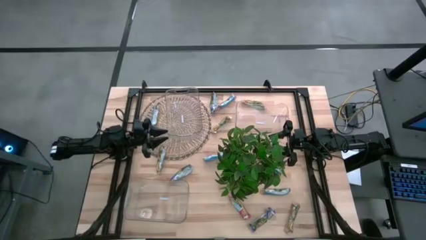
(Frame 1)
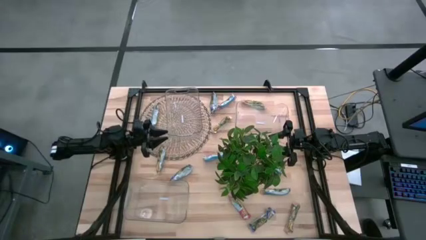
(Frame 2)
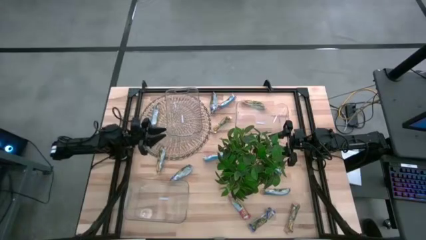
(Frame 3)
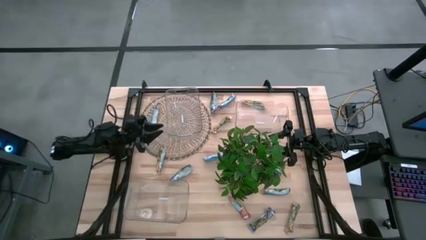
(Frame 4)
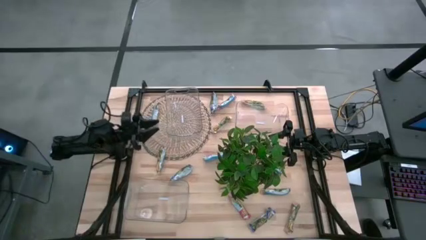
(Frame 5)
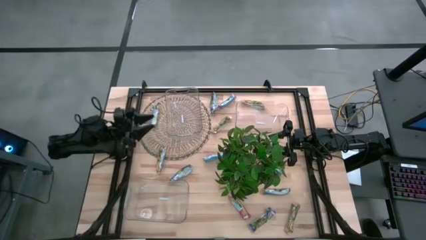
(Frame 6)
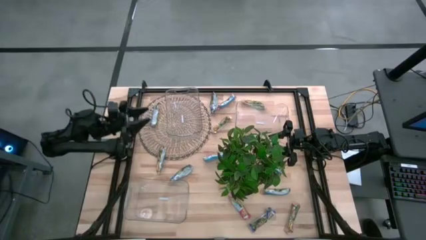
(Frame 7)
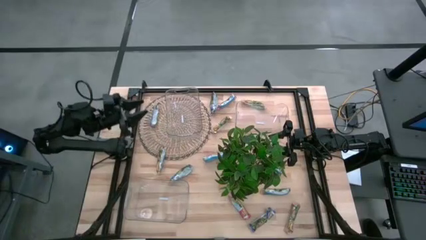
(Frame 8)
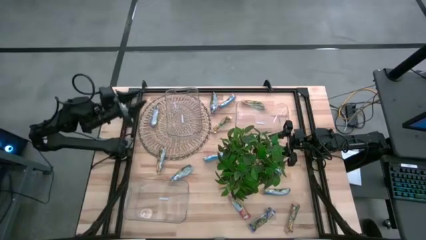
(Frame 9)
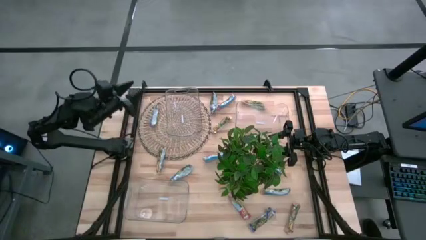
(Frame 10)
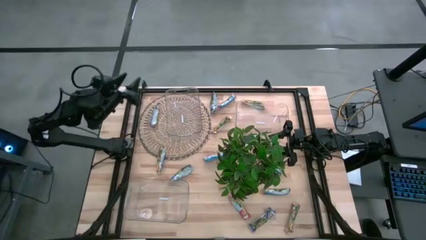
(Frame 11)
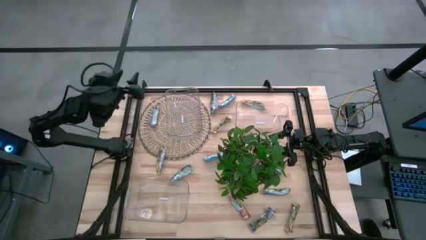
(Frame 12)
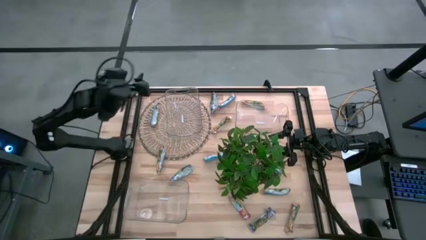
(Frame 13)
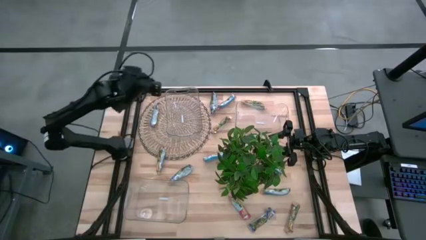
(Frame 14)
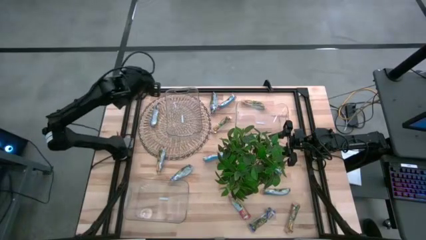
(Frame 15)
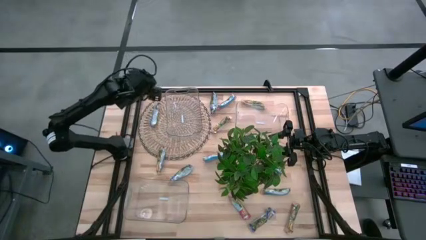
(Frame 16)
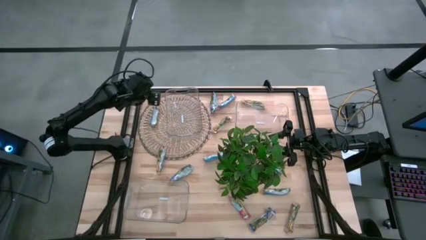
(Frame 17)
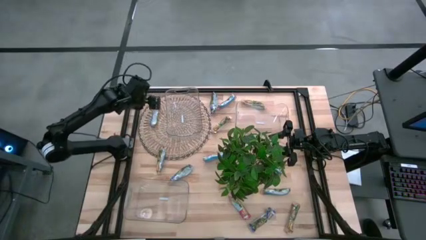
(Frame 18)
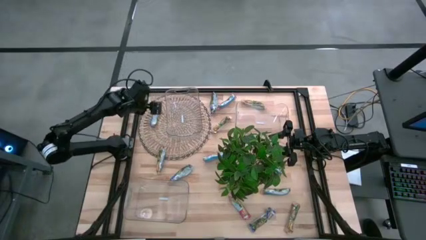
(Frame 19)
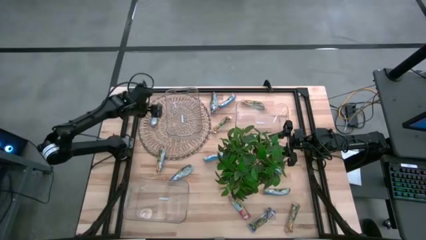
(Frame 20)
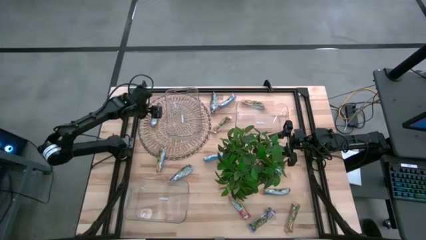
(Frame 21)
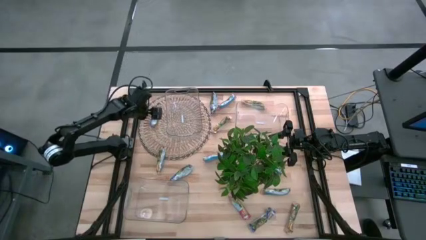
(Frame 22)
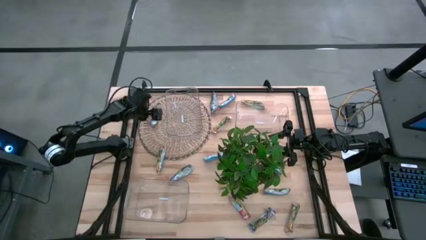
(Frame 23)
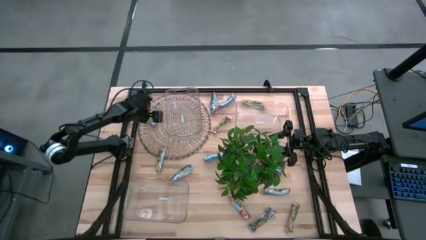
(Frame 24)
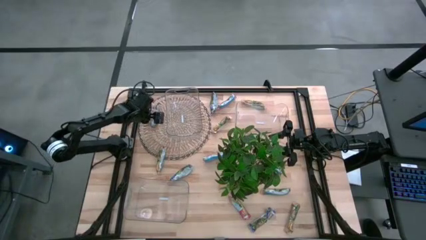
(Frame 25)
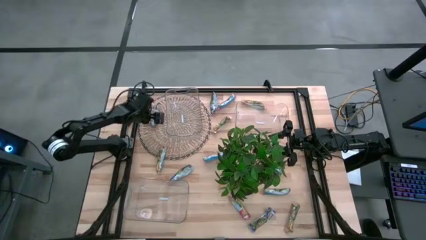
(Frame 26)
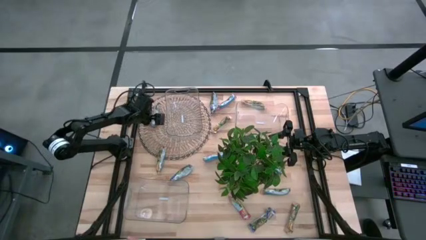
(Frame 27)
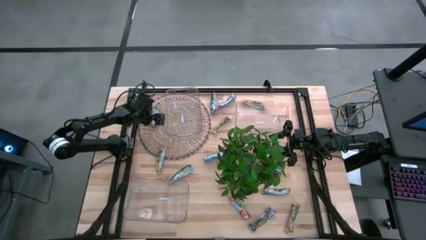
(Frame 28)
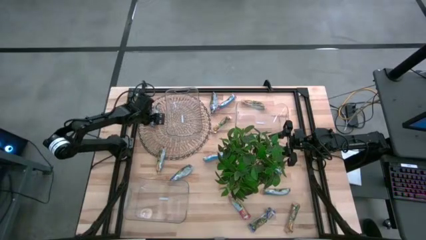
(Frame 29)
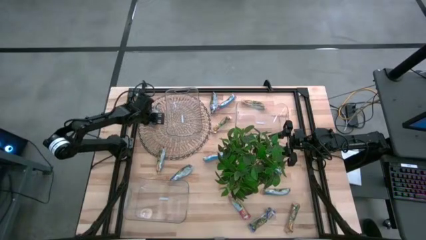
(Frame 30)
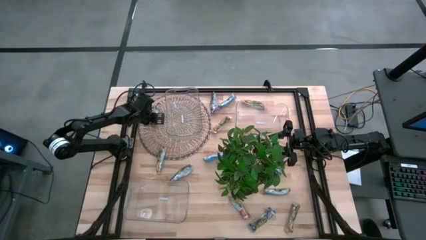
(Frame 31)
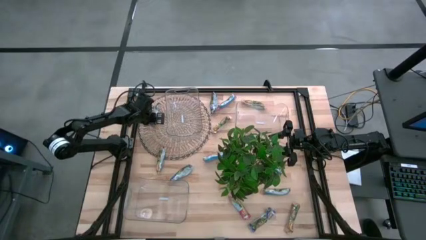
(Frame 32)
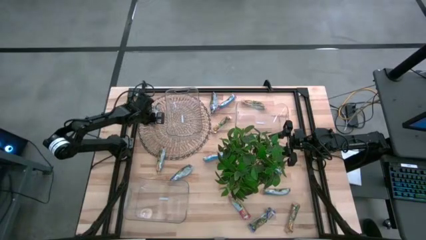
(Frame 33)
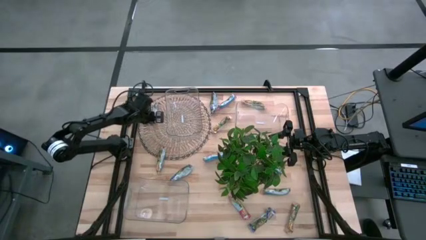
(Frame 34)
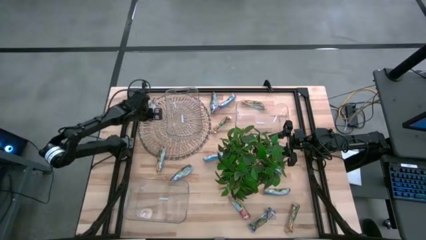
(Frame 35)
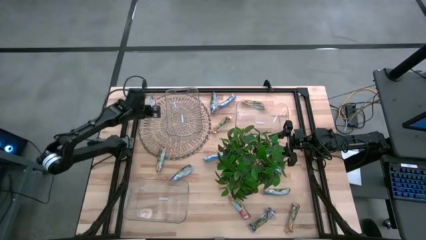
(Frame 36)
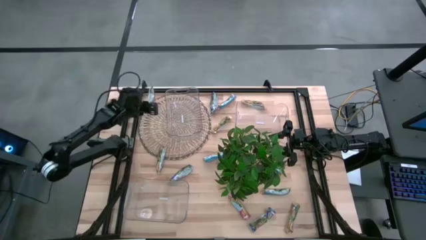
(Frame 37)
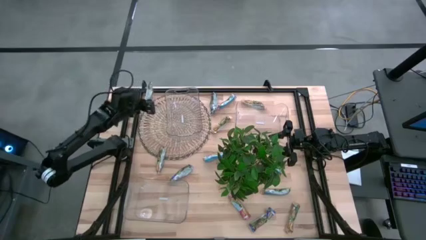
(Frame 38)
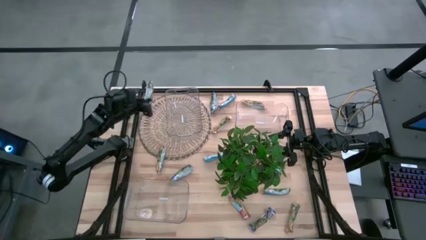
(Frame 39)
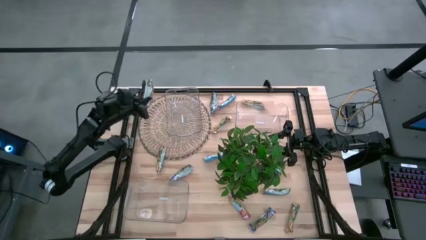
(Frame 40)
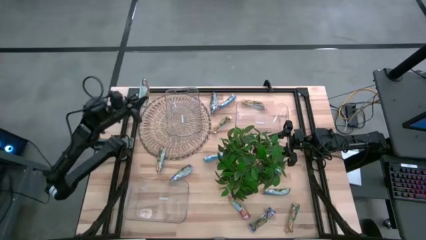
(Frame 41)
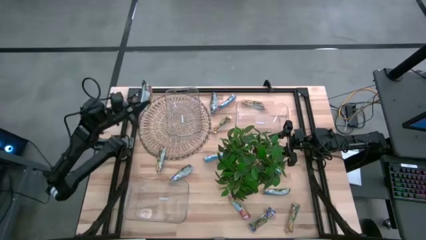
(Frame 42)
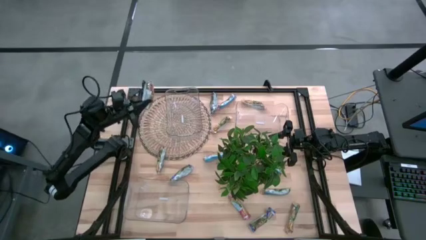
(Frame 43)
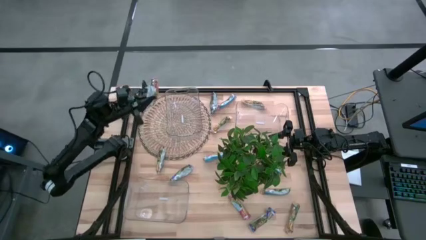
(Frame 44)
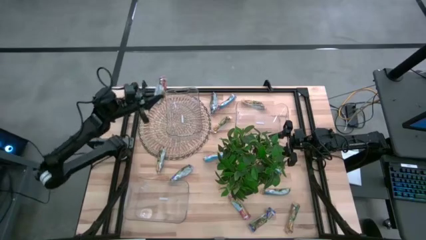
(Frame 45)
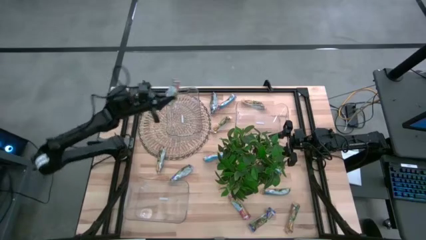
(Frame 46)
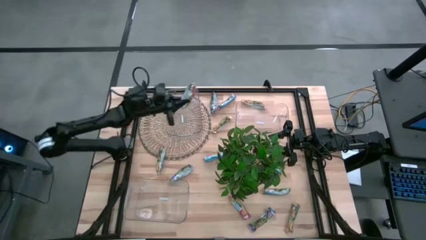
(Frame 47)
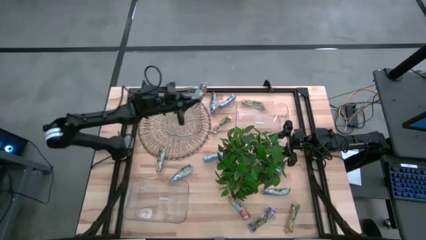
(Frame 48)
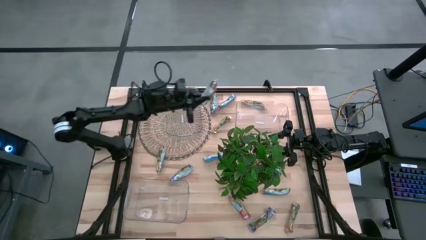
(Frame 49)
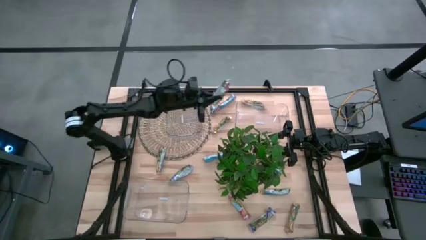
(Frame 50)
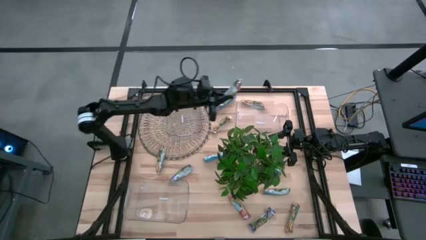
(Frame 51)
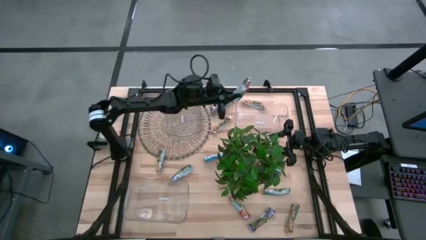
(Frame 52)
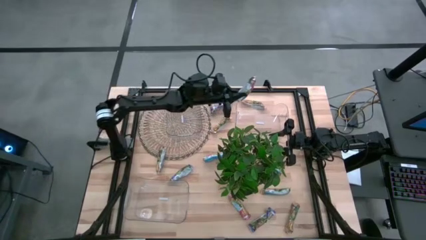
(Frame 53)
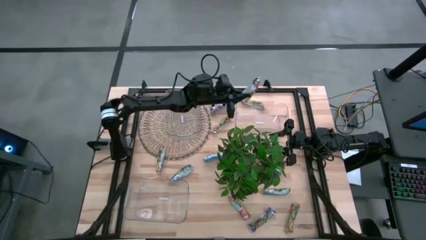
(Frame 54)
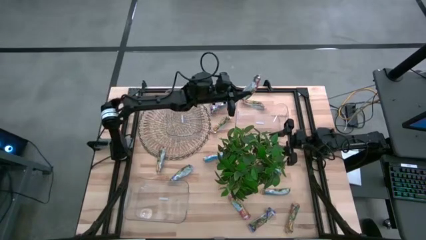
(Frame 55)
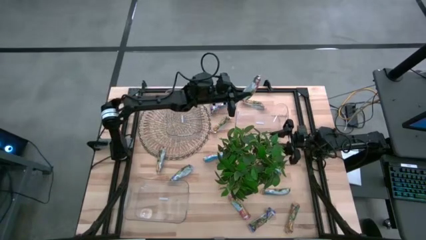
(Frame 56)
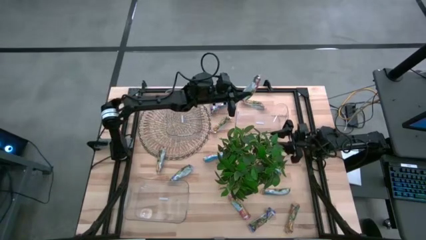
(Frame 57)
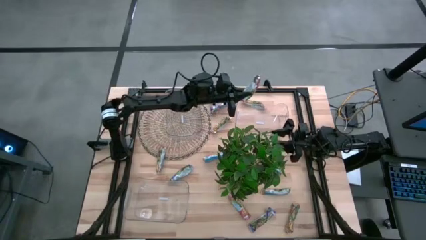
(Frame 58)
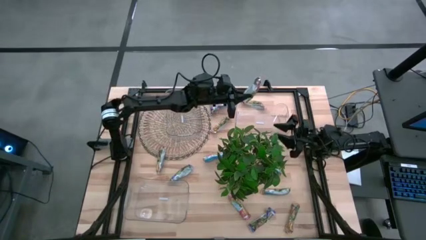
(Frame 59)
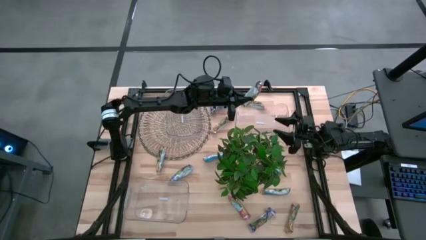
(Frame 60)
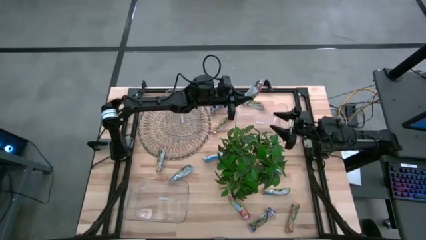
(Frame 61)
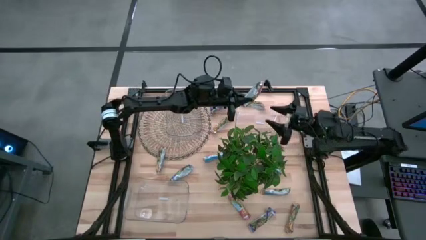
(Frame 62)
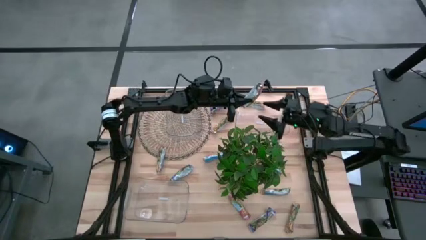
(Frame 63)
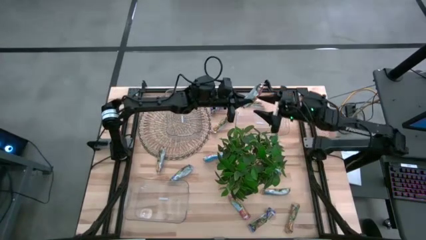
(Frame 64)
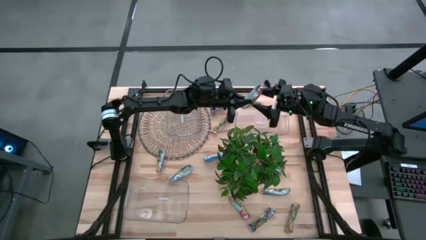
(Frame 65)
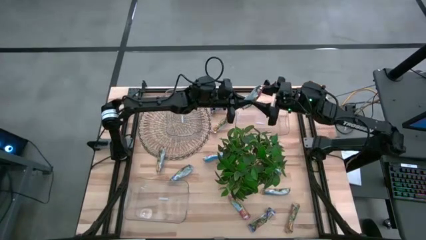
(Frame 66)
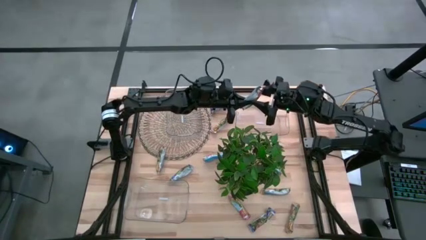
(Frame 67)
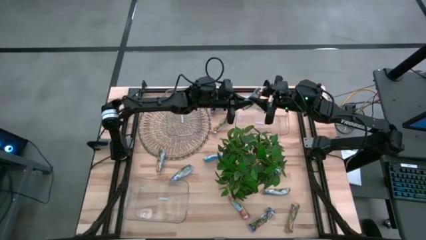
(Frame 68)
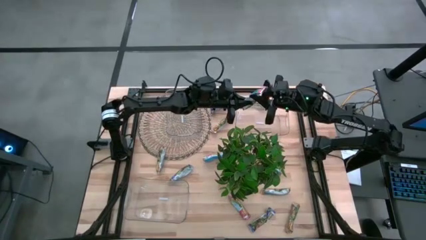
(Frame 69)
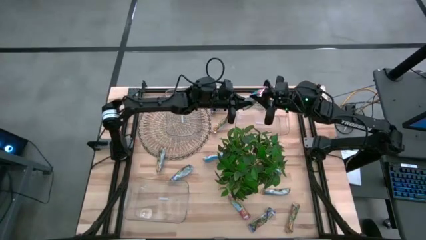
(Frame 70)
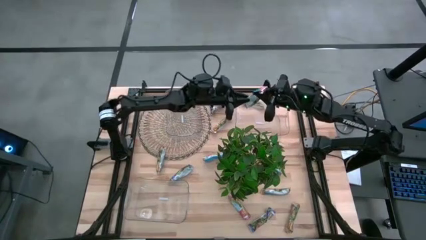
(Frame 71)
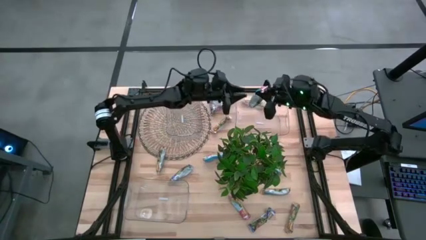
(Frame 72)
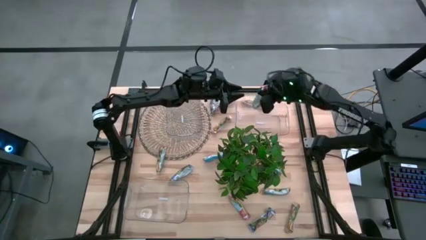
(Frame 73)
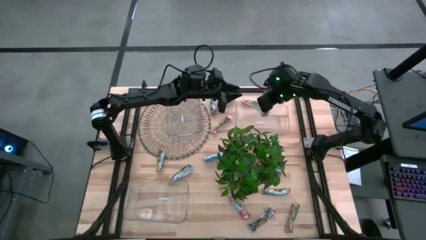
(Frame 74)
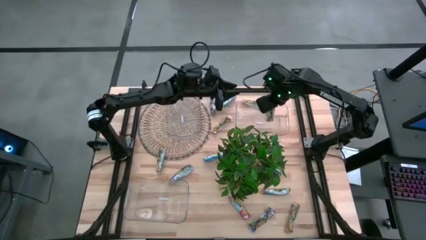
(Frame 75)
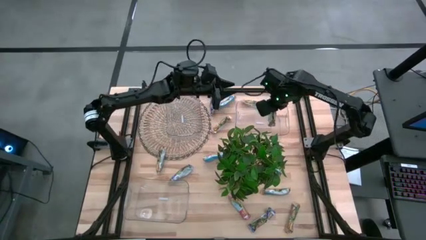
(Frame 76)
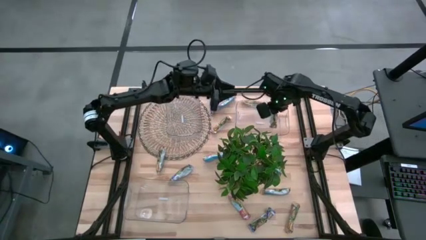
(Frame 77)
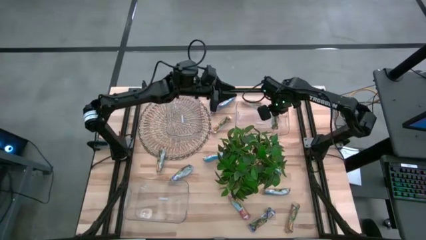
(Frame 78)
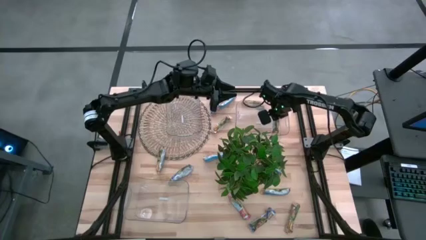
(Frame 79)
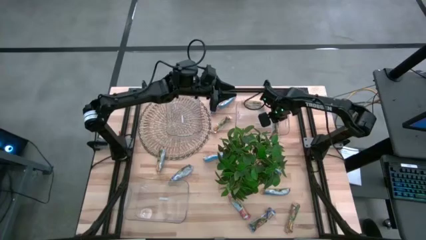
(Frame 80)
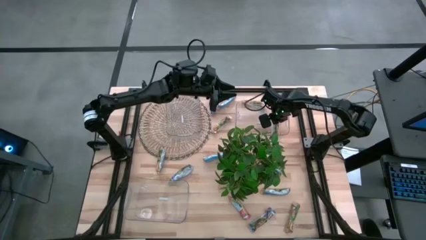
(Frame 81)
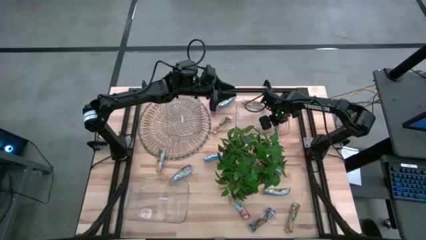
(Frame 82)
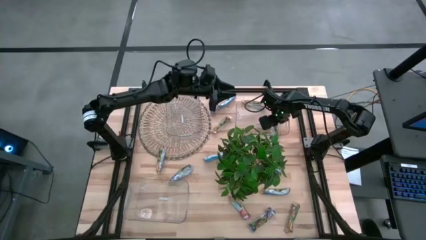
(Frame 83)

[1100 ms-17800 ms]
Task: Pick and place Granola Bars by type
Put the left red granola bar into the top right transparent bin
